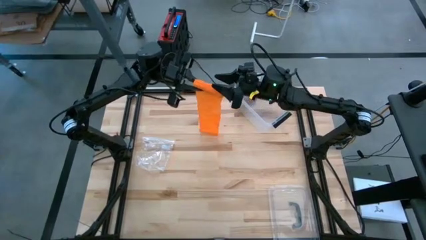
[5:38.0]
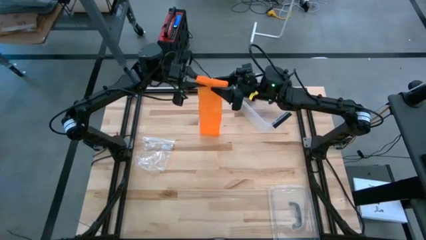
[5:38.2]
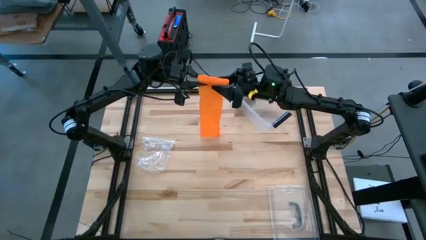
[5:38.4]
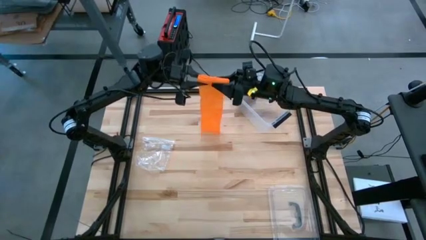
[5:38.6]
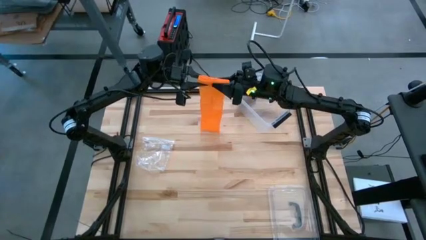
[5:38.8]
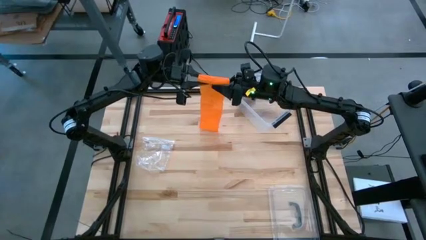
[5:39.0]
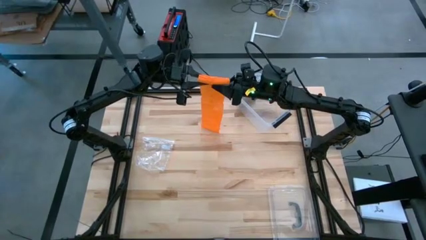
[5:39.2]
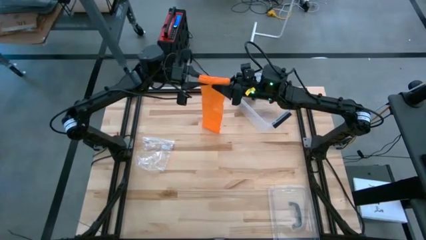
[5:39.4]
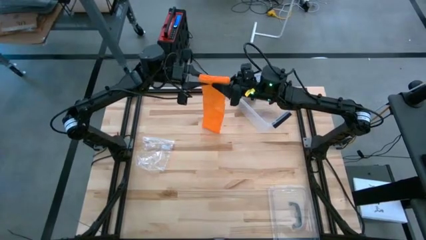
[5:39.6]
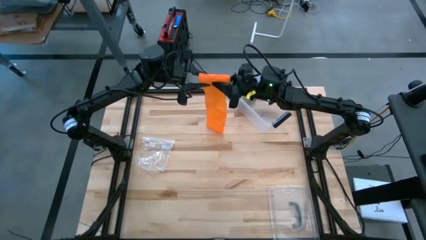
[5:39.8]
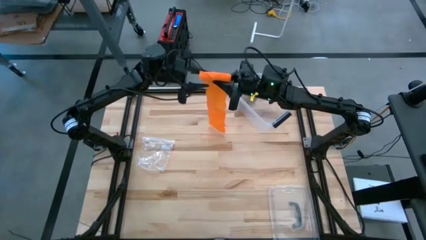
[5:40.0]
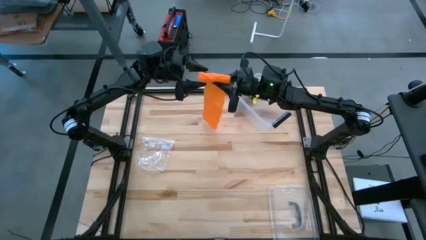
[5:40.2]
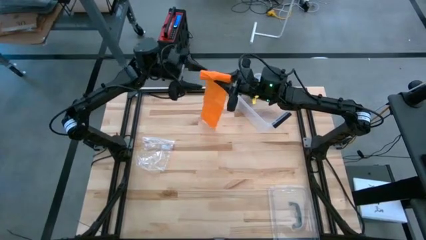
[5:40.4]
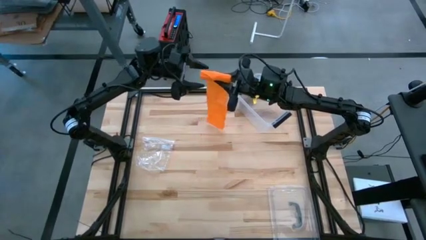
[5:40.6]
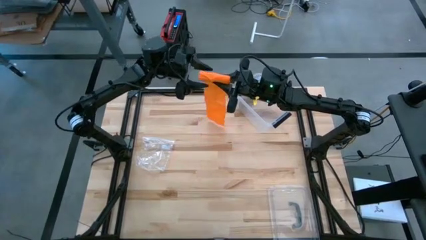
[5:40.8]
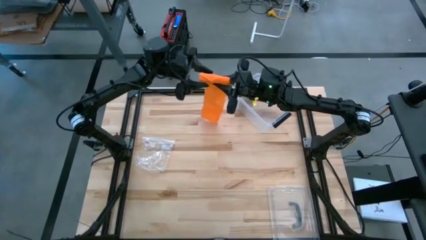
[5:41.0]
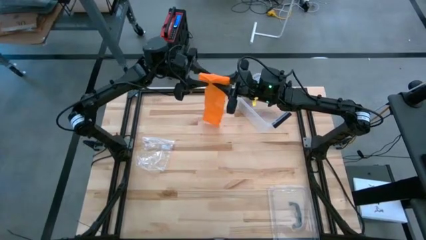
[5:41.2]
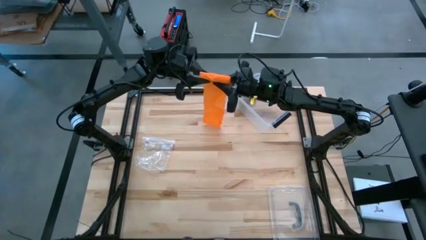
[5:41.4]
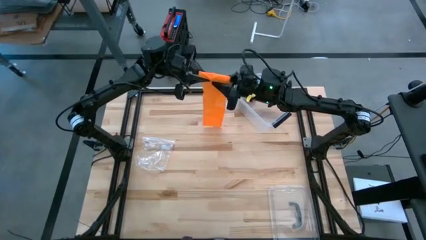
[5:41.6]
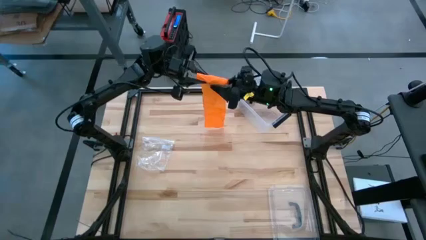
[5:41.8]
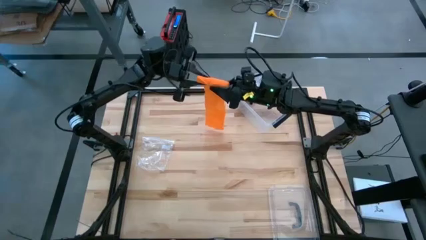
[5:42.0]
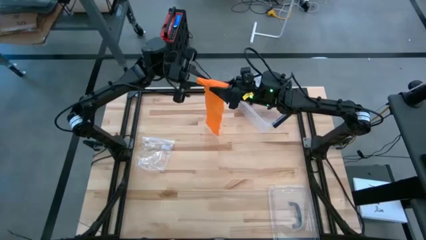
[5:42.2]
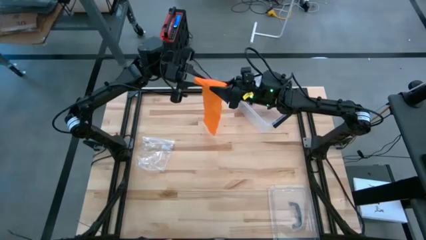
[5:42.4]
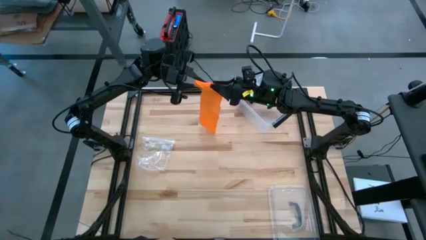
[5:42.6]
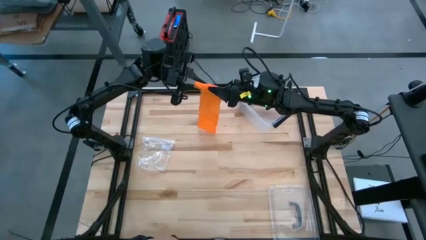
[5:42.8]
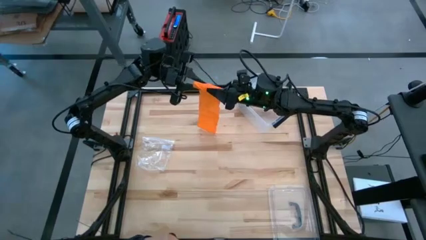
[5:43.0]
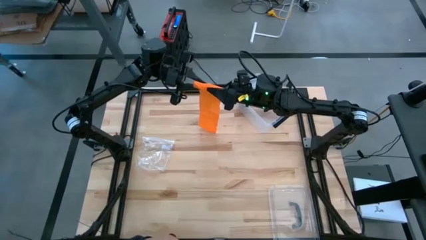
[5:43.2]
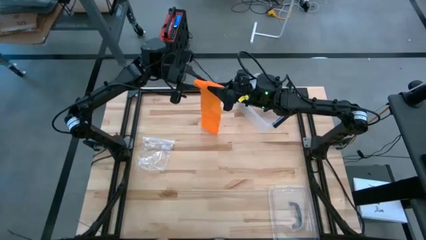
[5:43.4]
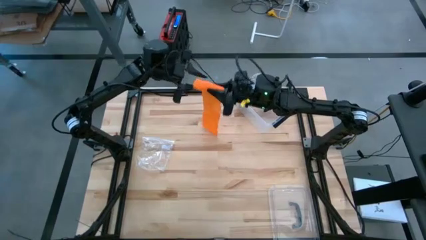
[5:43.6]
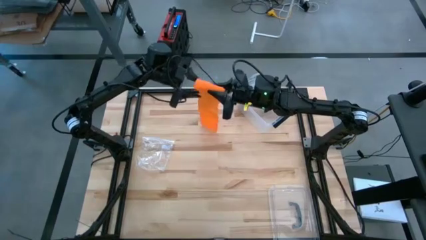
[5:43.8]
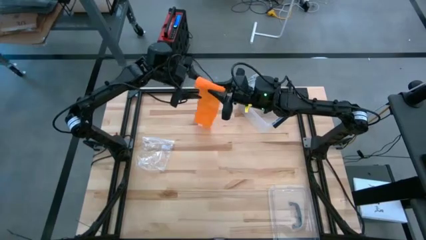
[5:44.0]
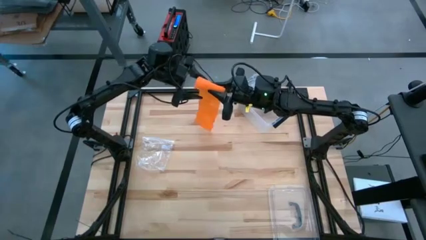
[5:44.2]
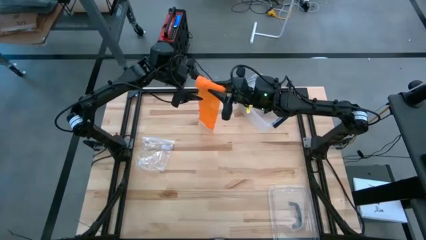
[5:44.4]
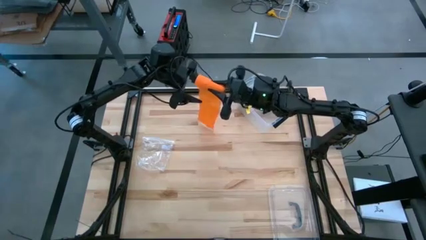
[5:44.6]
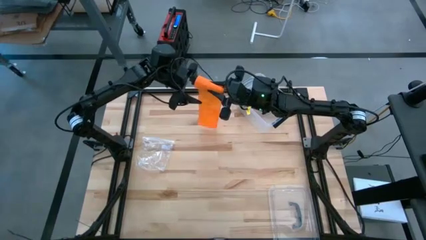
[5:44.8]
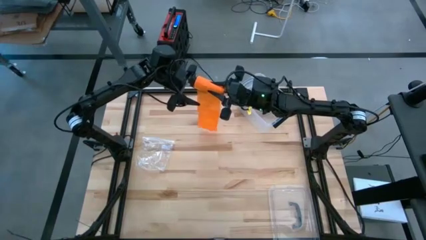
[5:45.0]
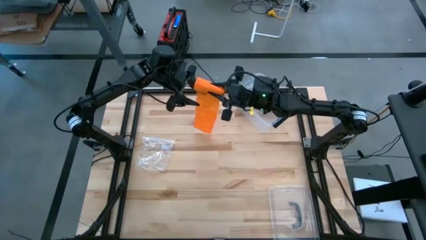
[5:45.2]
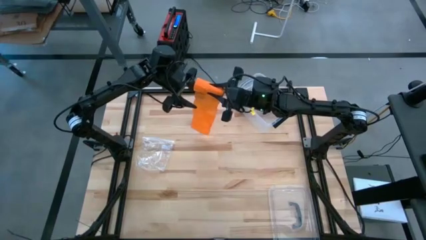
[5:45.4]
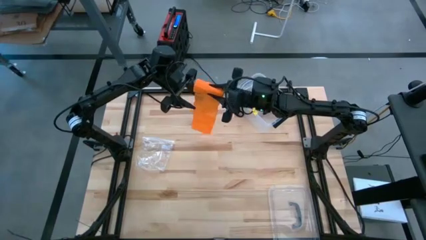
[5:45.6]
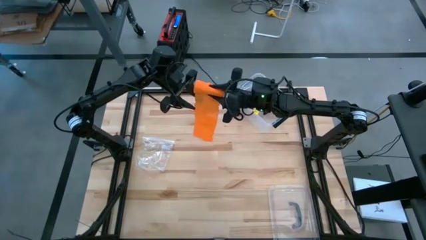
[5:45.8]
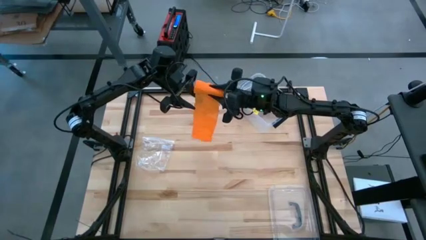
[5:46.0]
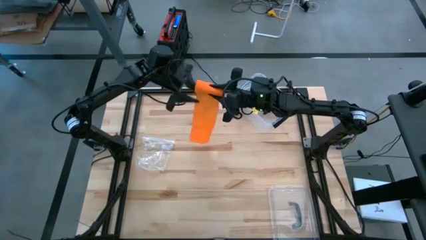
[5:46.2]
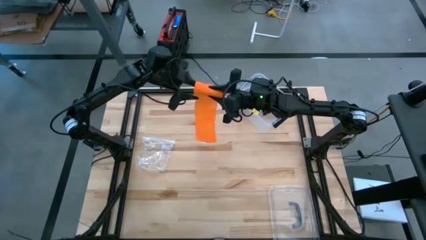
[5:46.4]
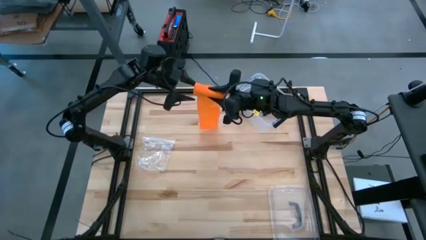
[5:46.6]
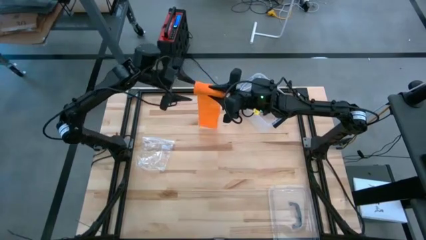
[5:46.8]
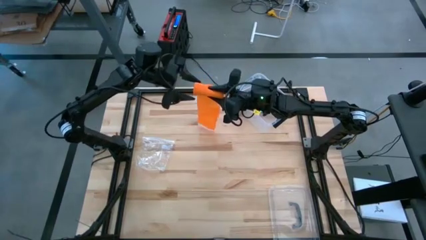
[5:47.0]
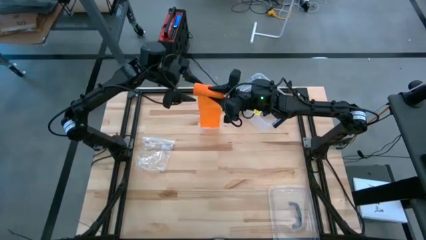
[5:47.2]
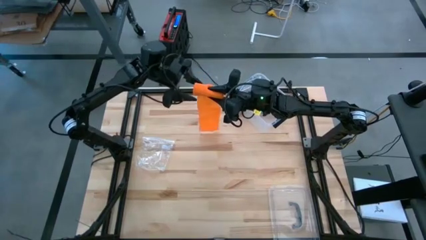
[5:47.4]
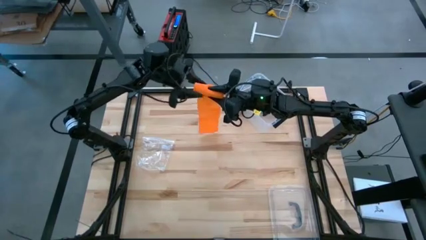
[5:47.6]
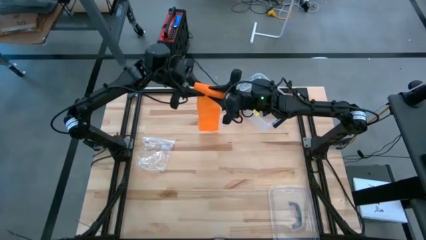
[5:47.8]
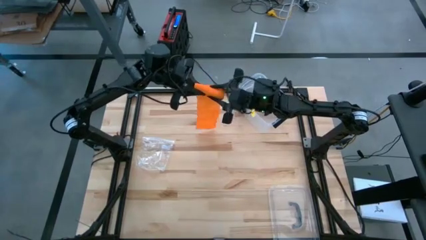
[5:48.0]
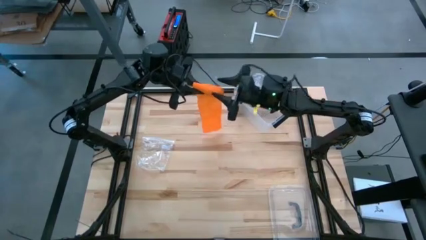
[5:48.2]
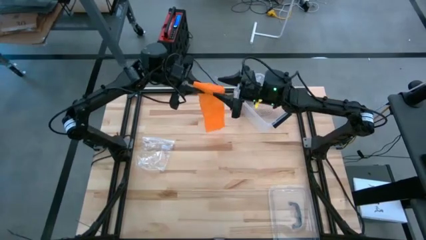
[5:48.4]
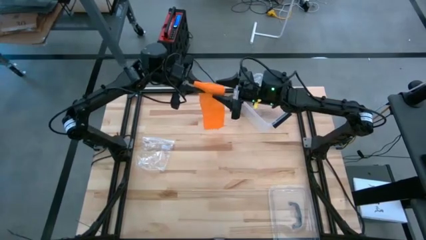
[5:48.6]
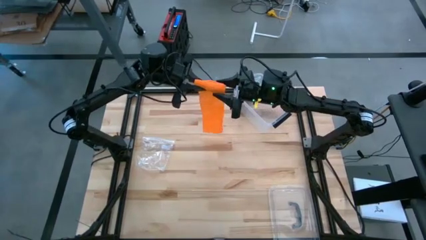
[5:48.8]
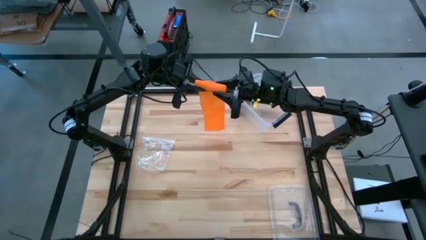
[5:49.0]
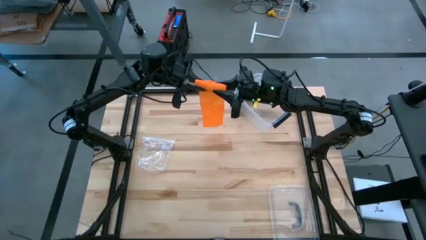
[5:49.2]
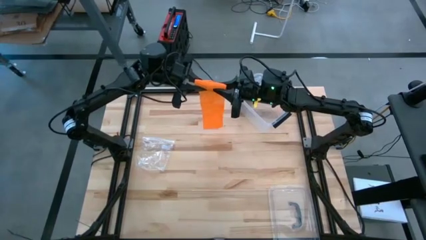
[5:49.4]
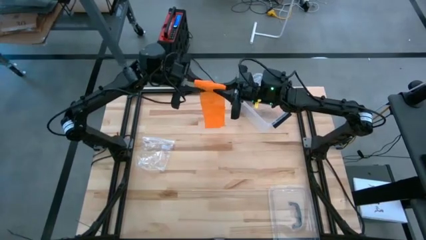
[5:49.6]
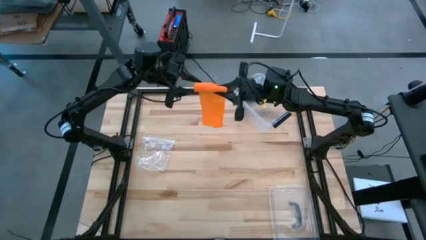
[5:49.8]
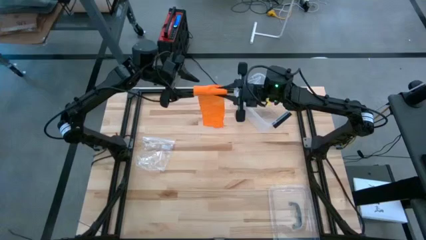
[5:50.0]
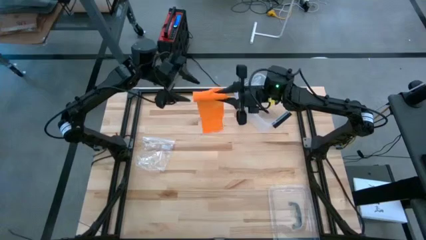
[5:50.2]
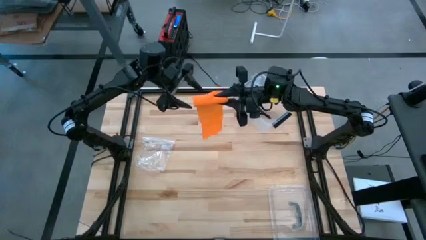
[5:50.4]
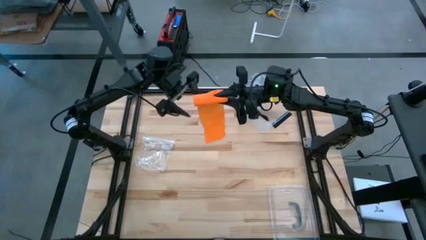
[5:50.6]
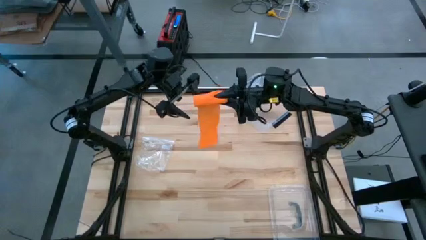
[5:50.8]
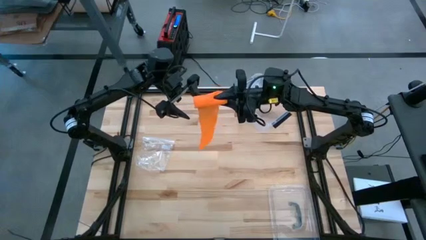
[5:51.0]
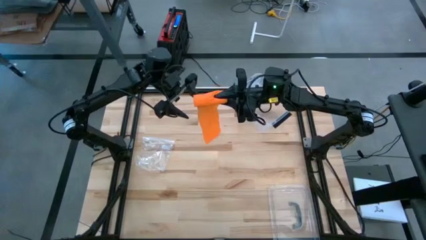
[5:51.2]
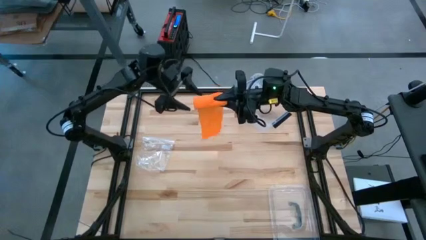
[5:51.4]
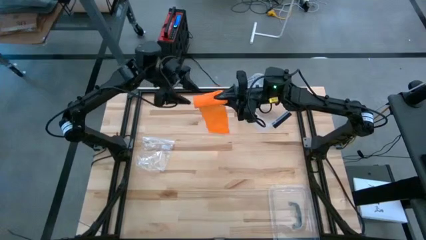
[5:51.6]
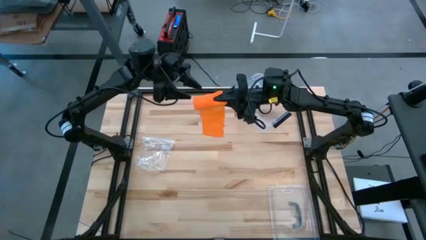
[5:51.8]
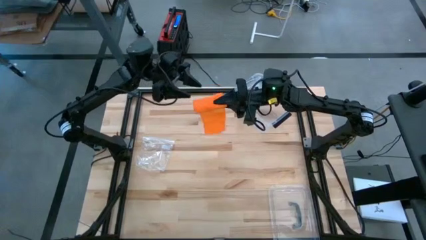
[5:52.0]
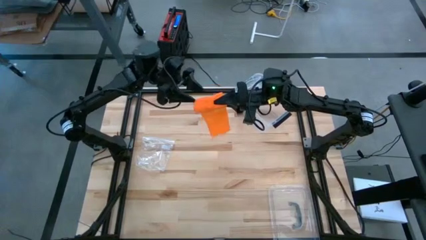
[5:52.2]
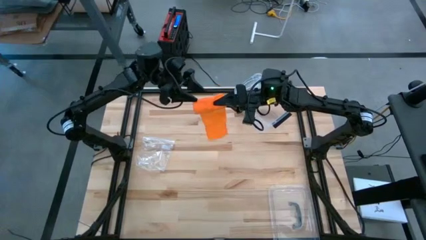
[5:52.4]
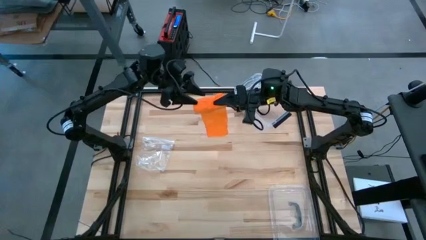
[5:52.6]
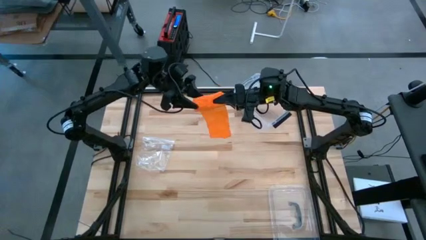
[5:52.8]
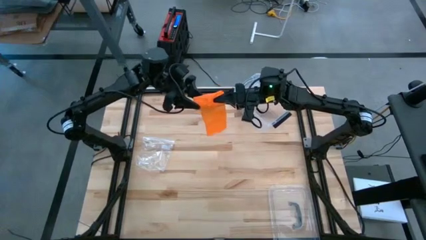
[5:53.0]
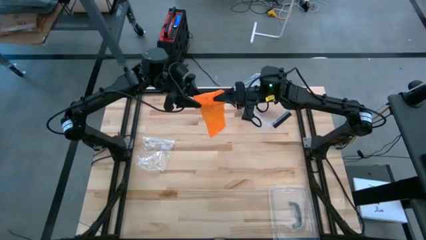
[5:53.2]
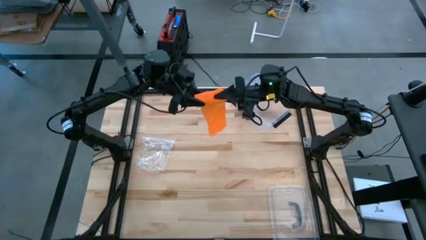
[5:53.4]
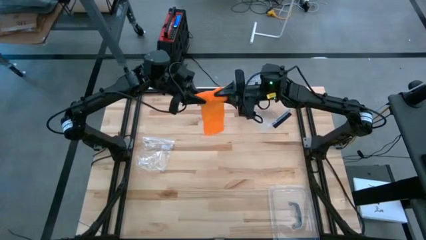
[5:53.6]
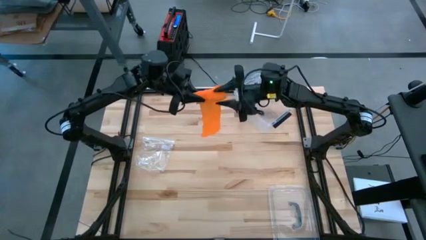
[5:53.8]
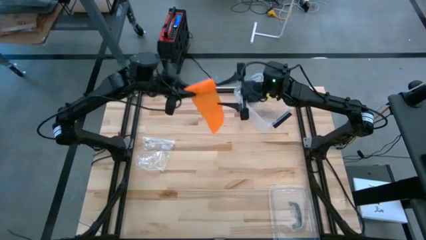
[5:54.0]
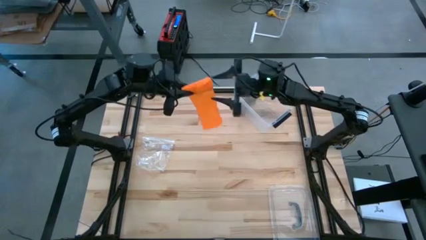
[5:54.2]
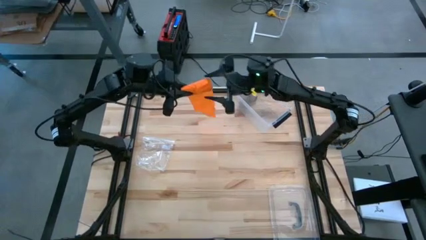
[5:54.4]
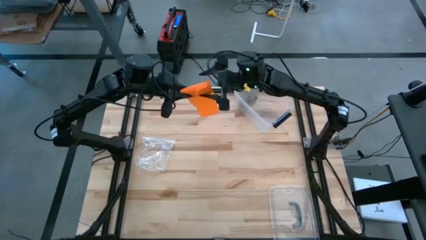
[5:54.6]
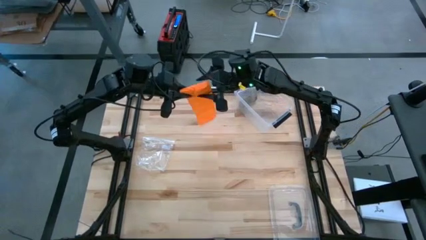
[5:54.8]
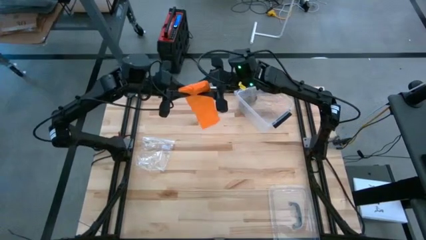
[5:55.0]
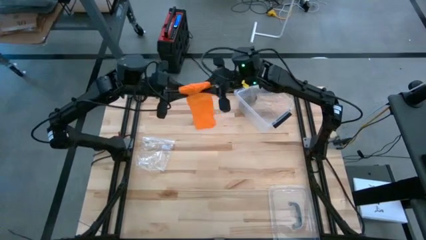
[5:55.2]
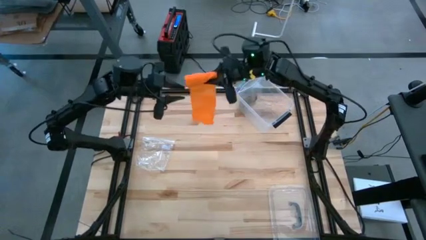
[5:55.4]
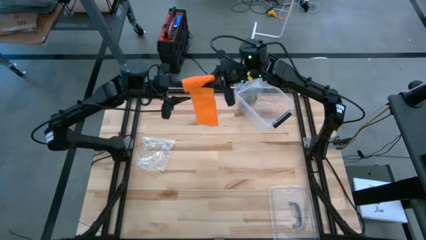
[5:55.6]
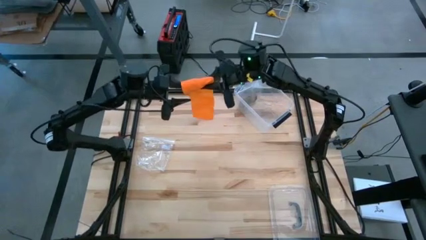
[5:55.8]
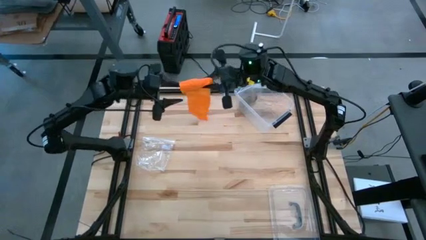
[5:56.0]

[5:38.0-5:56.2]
Task: Roll bandage
Roll the orange bandage on the table
